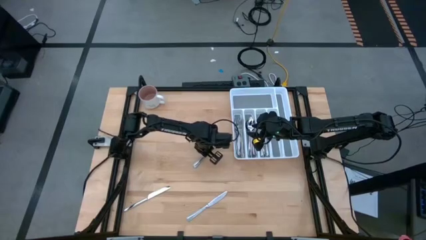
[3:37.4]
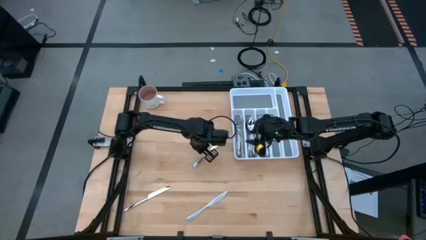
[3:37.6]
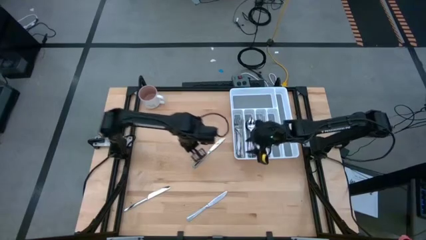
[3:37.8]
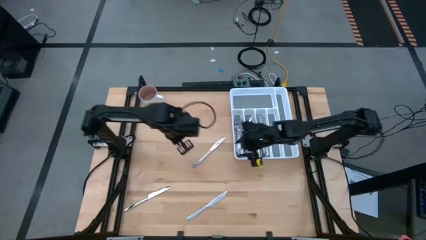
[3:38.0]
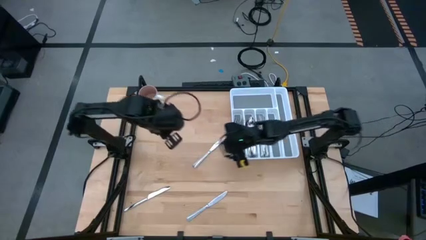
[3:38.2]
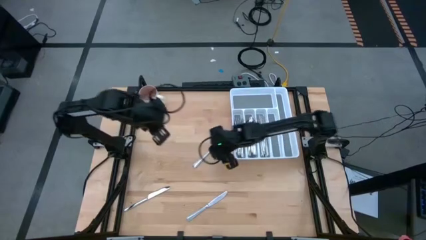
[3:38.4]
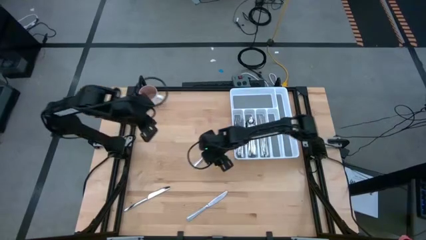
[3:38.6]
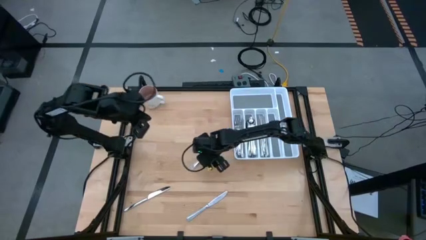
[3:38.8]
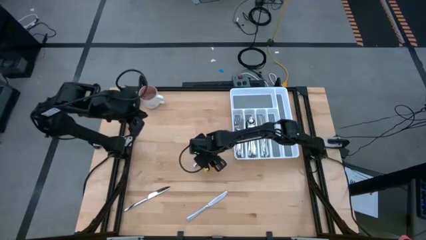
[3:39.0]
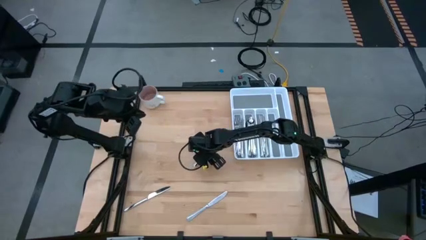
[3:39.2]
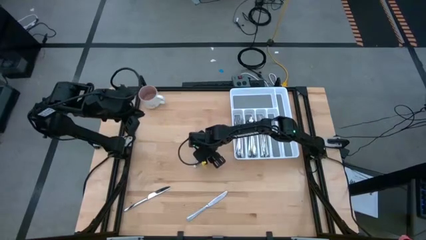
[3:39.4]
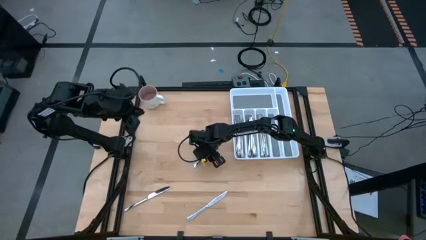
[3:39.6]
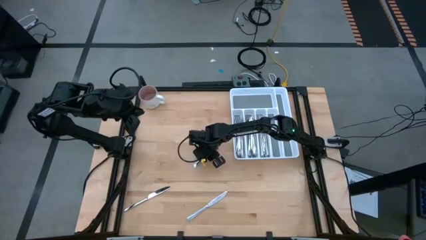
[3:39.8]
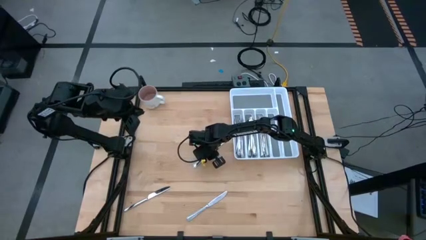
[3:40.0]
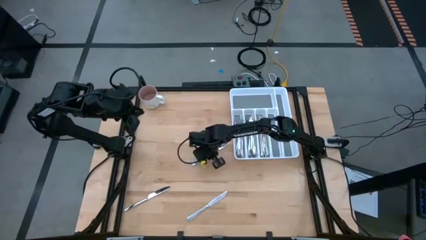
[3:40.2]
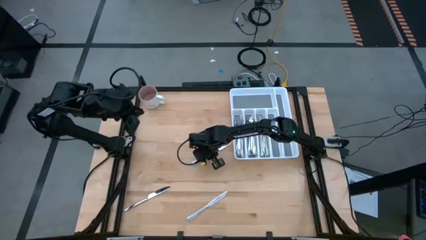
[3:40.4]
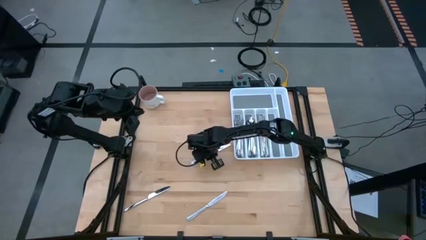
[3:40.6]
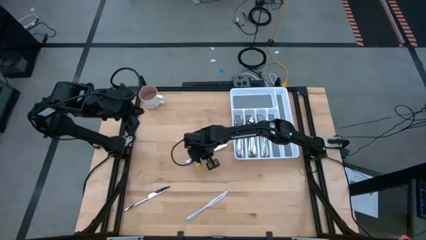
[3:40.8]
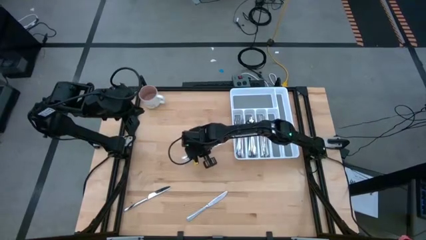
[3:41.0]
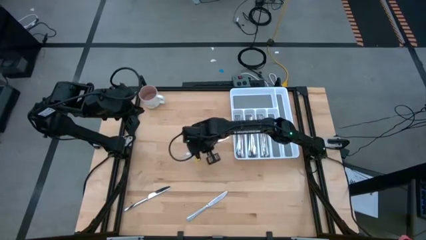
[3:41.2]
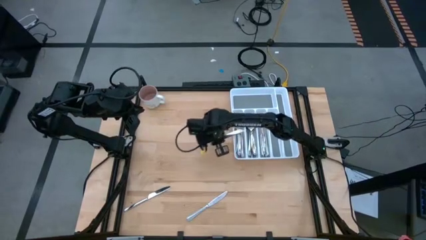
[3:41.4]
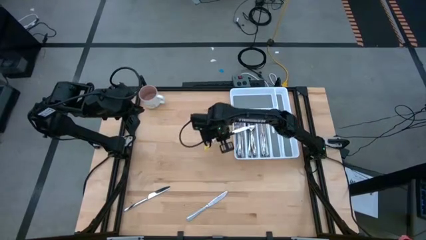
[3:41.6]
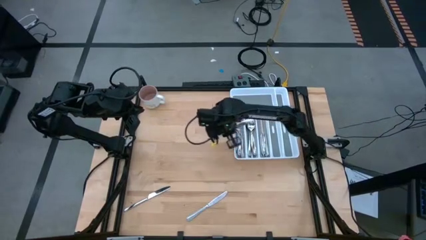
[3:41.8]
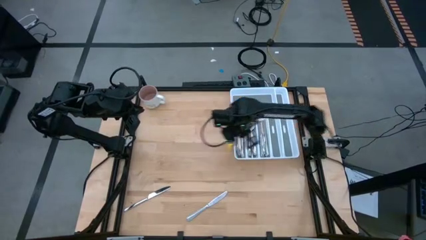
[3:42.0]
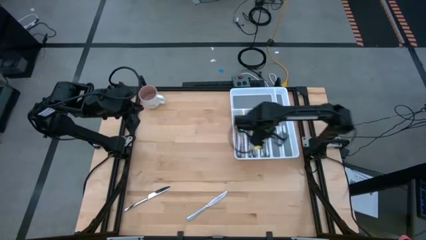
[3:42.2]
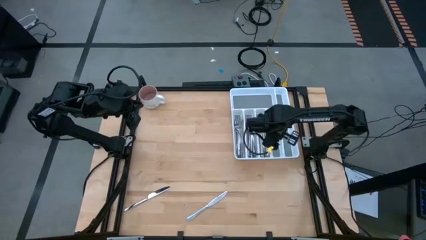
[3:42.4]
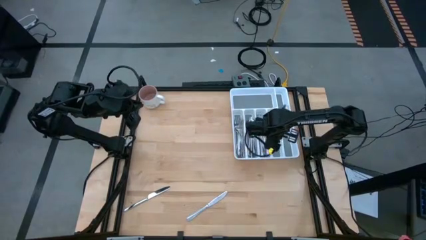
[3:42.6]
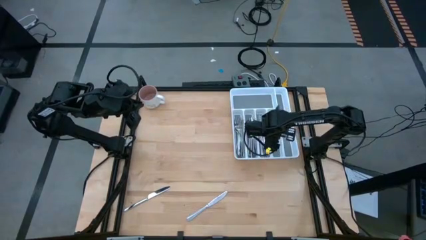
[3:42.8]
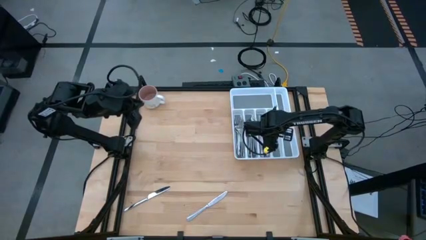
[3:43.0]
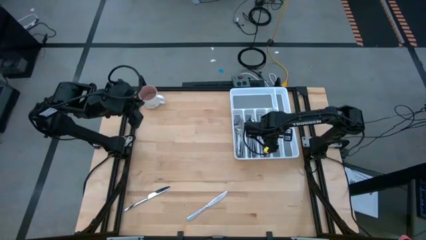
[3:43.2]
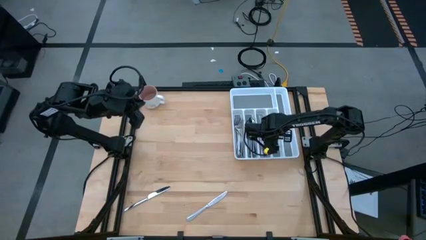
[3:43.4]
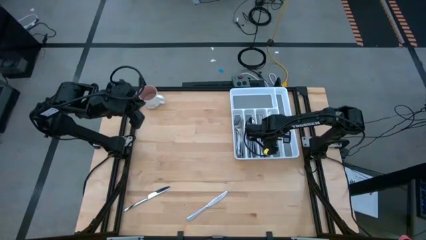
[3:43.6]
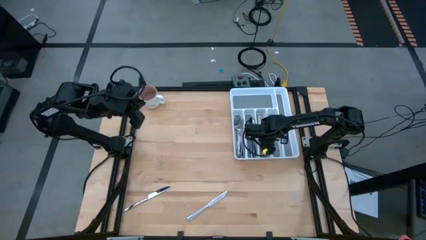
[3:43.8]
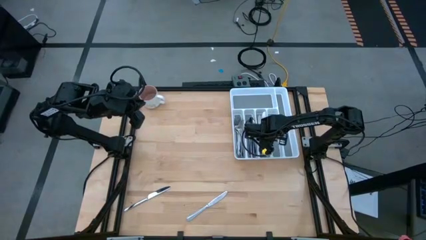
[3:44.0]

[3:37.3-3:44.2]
Task: Sort silverware
Put the silver table knife into the silverware tray

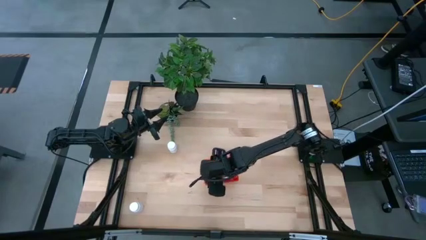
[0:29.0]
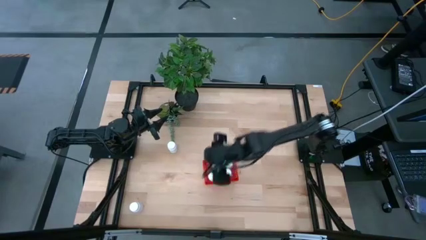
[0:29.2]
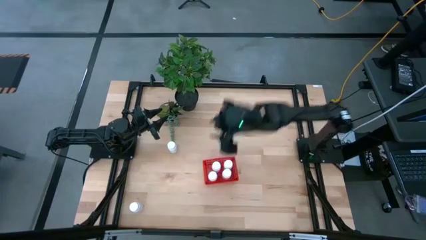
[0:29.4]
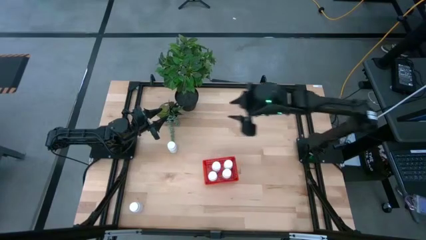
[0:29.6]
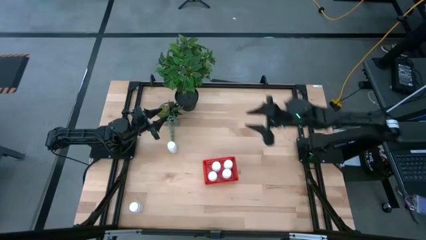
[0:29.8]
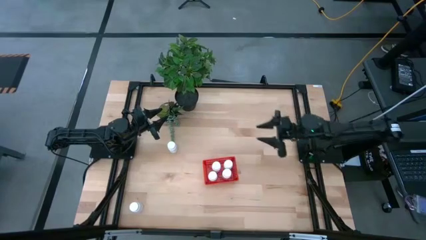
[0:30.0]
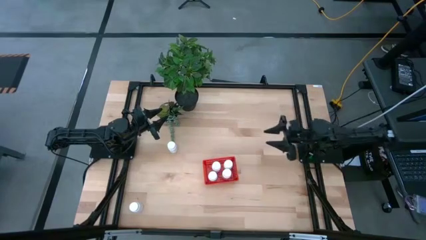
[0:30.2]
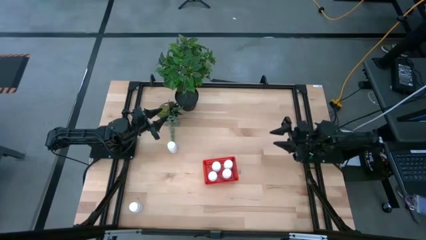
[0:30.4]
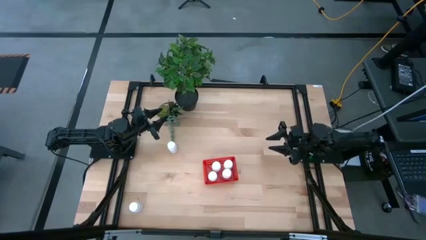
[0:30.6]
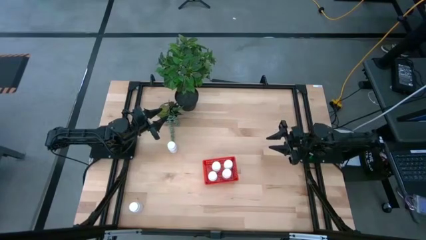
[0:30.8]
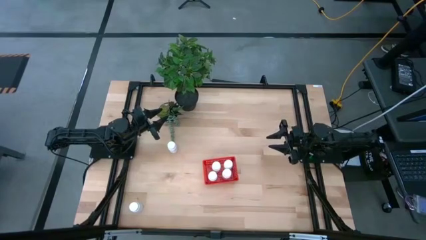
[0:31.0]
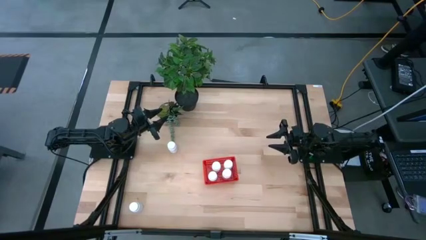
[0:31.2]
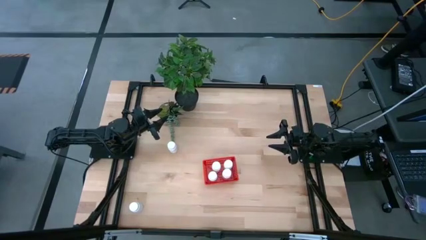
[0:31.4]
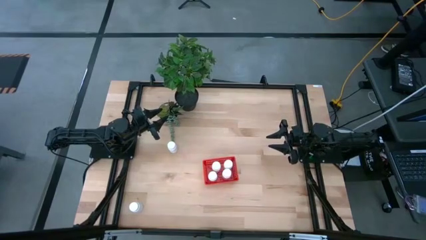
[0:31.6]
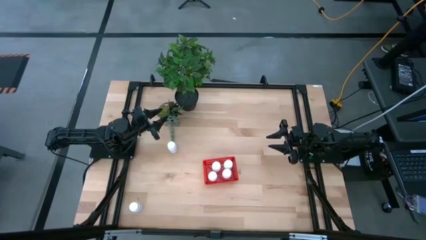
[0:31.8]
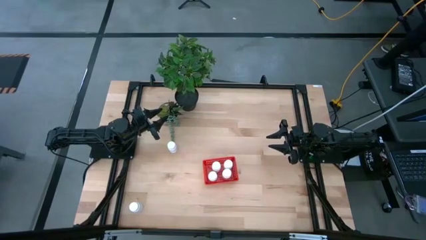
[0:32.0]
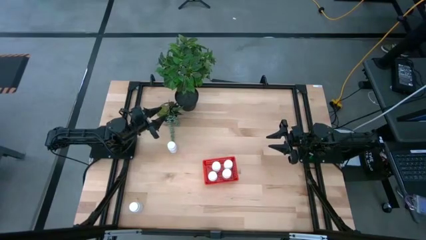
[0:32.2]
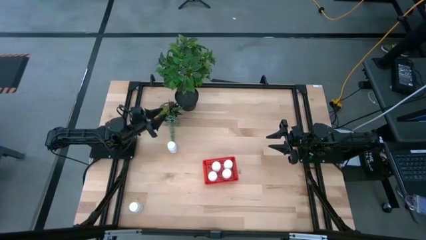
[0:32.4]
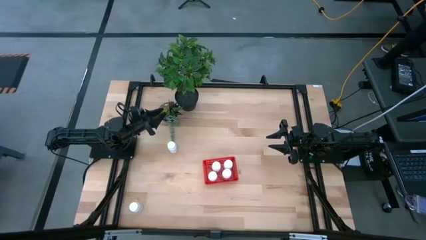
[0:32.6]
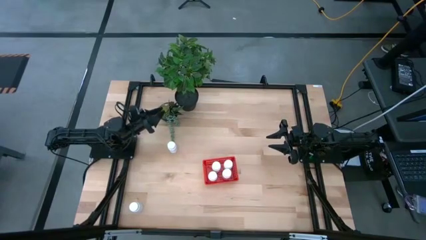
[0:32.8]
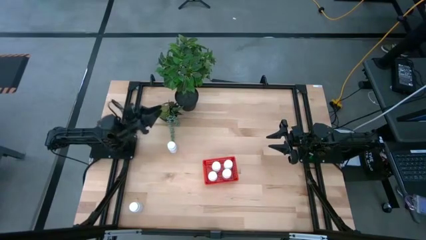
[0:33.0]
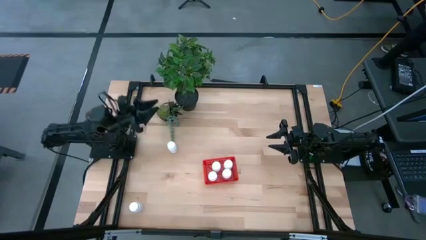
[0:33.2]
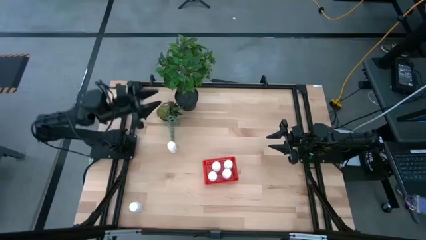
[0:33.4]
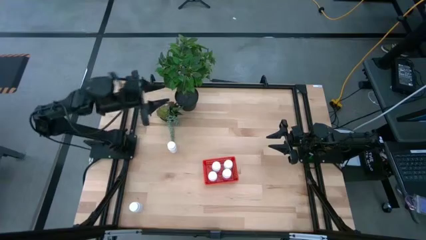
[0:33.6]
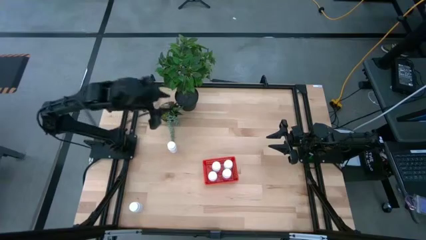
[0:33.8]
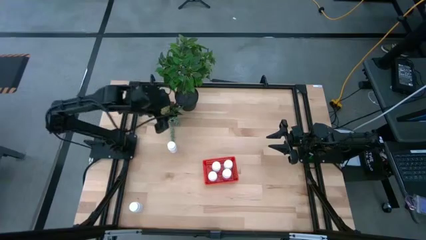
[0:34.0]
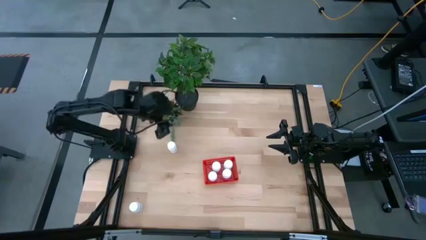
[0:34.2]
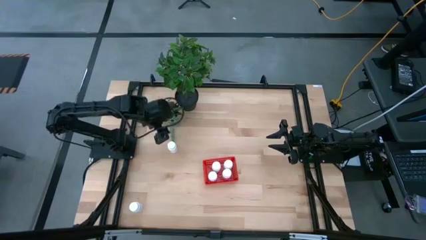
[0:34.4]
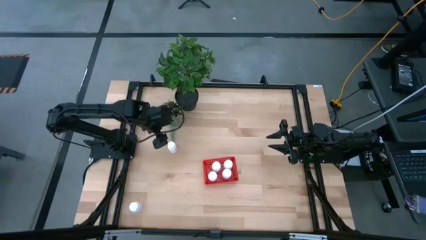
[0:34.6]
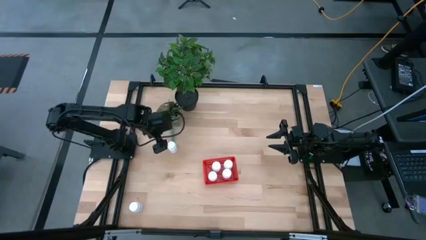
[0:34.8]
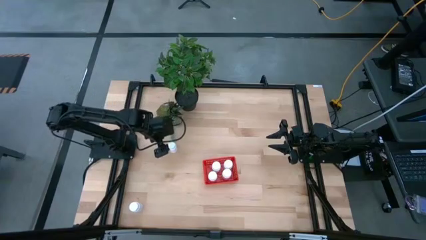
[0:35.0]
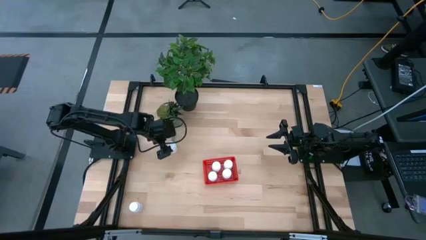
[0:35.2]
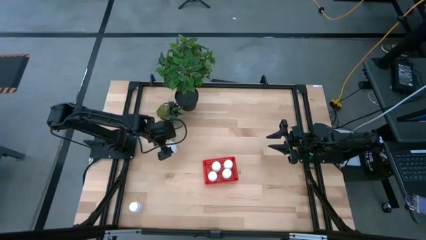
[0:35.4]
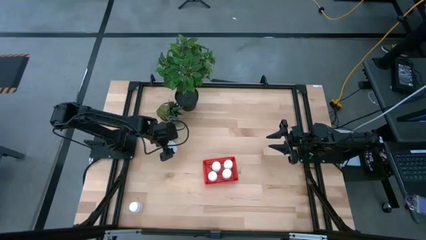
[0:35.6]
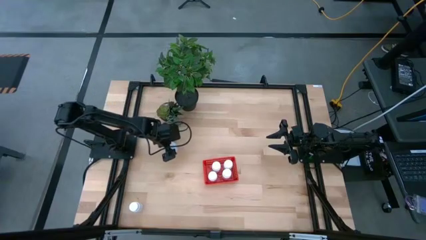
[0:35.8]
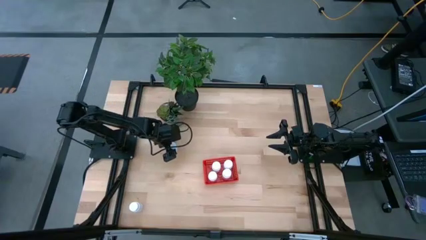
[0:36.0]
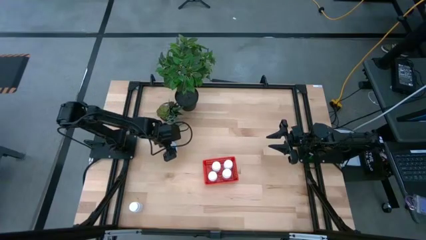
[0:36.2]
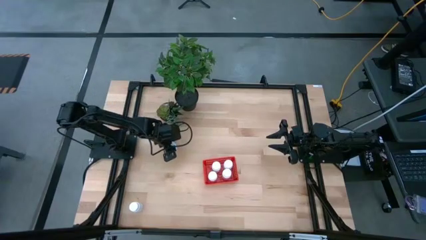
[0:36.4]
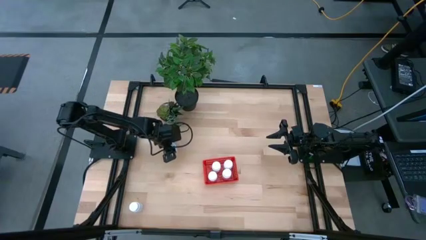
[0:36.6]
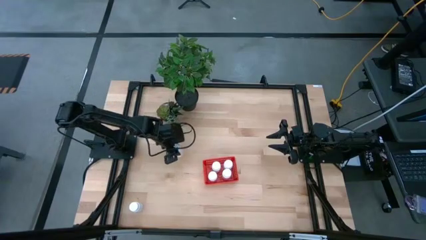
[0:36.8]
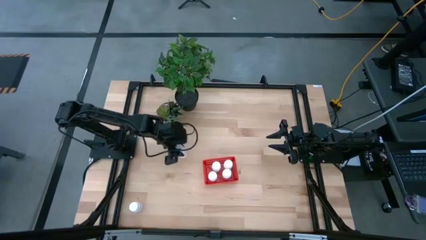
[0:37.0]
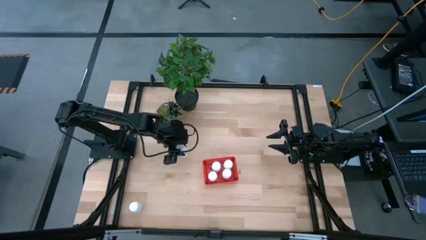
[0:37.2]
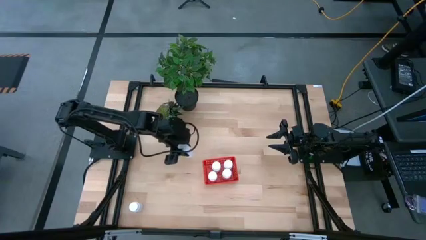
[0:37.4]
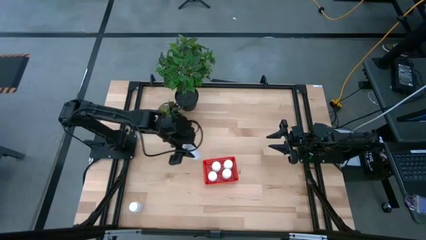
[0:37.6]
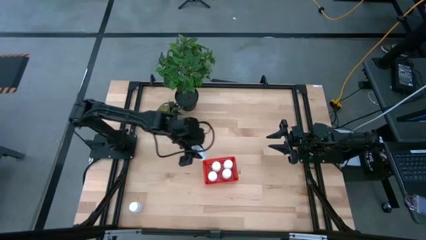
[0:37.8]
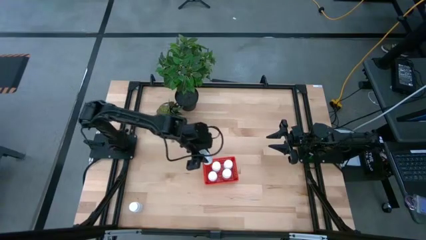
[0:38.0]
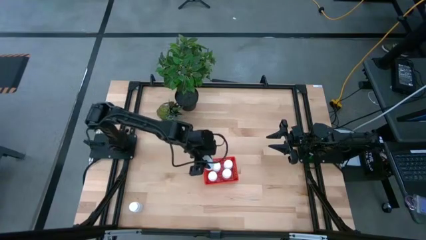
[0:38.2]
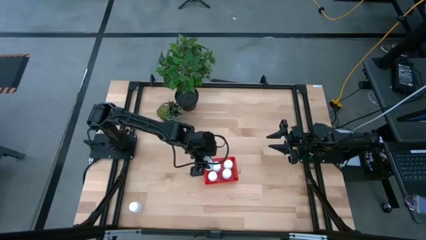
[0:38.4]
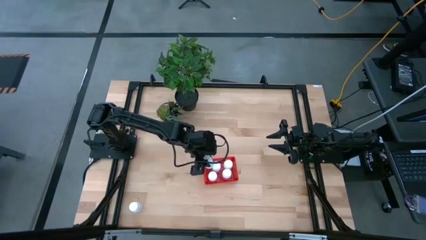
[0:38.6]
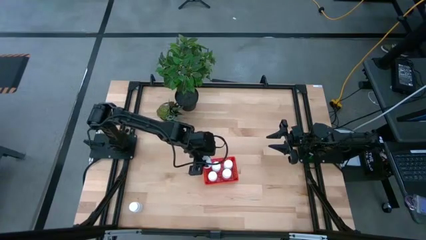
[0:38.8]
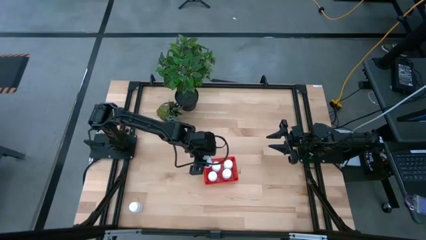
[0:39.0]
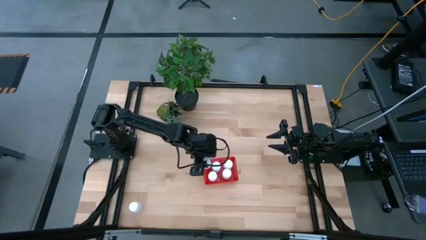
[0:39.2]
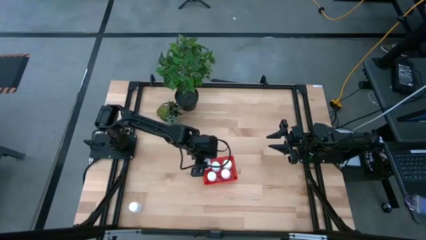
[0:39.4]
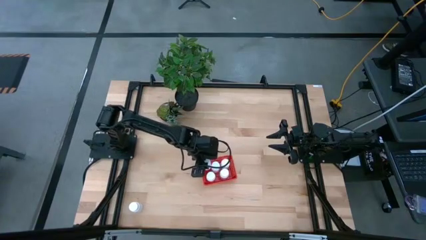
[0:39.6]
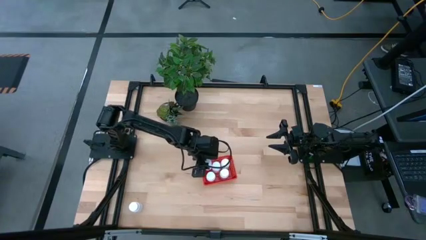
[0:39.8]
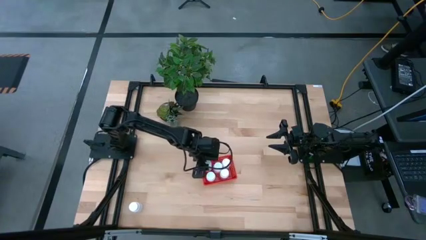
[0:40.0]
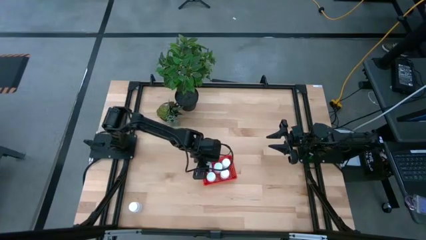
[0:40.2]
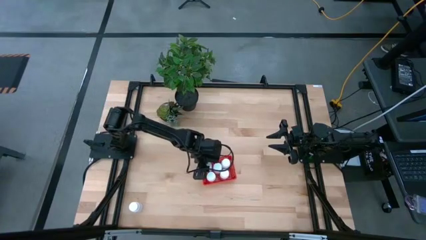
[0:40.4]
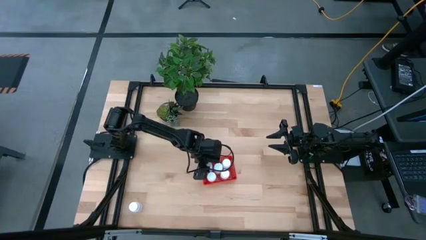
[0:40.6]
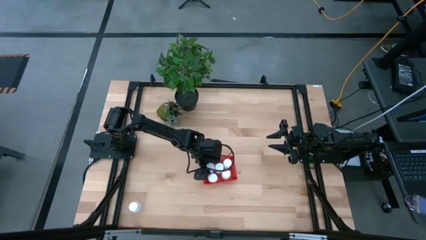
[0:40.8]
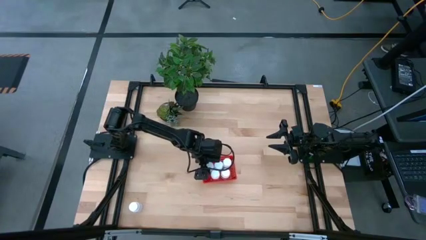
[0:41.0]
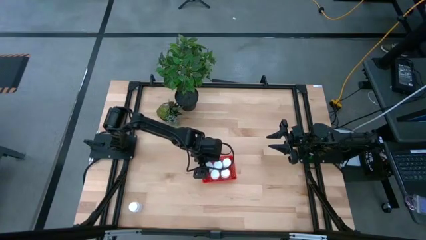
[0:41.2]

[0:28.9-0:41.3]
Task: Pick and place pill bottles into a basket
Put the white pill bottles into the red bin
